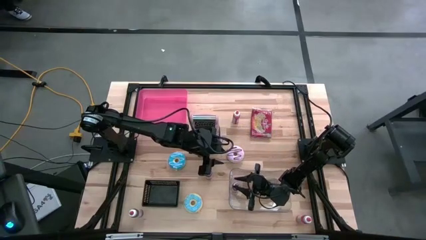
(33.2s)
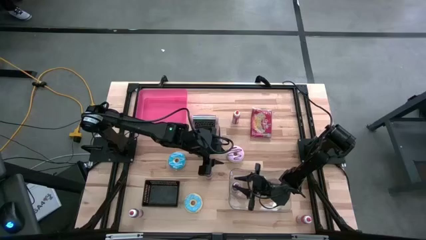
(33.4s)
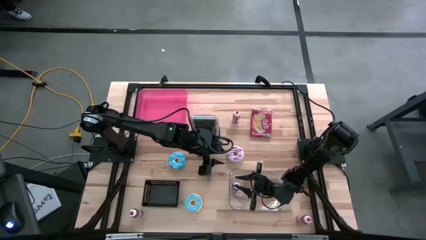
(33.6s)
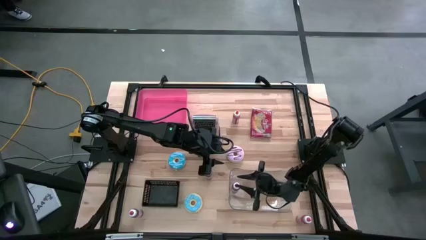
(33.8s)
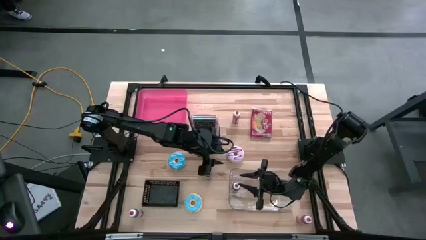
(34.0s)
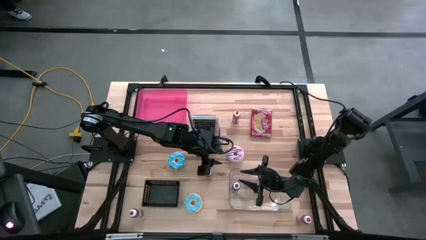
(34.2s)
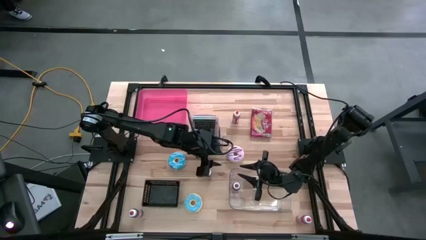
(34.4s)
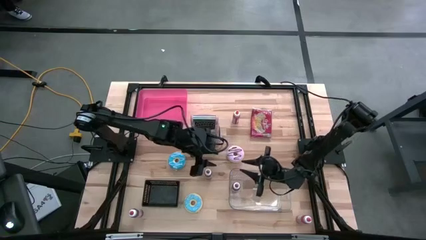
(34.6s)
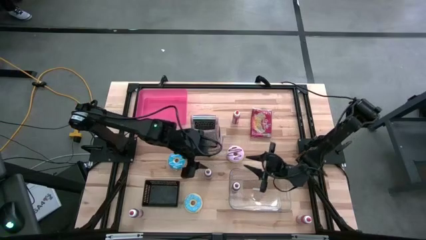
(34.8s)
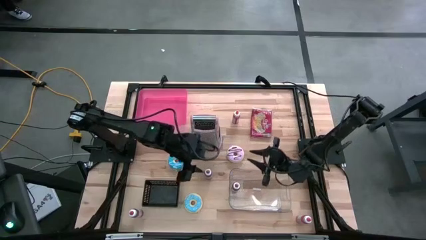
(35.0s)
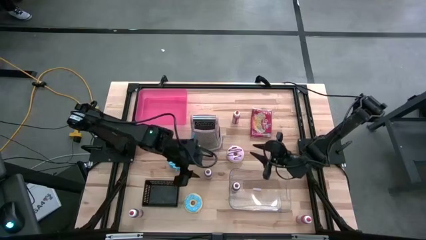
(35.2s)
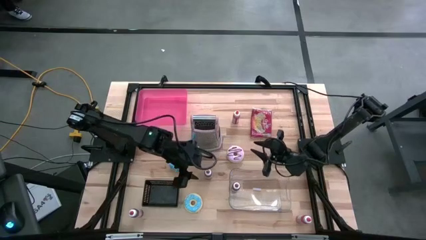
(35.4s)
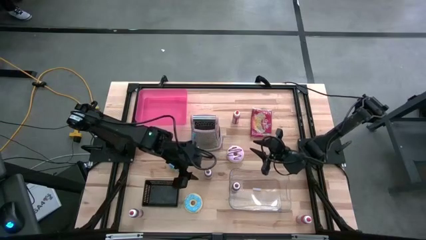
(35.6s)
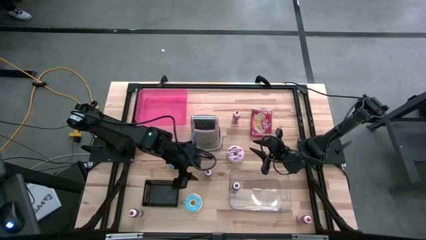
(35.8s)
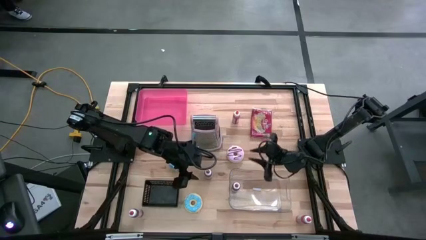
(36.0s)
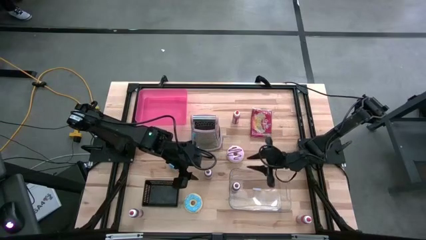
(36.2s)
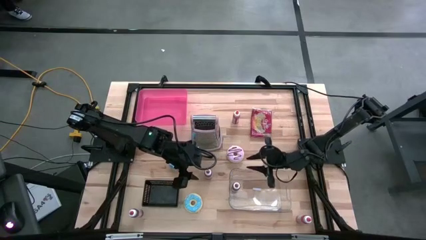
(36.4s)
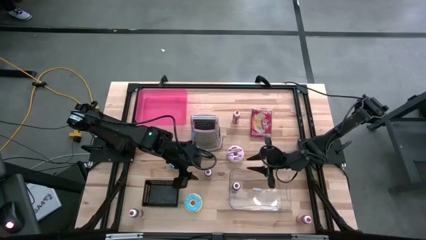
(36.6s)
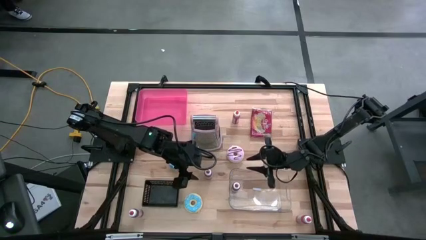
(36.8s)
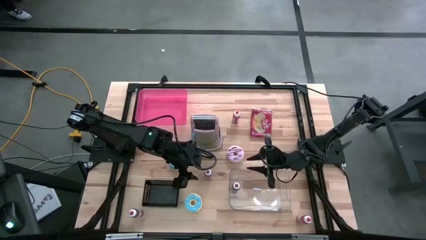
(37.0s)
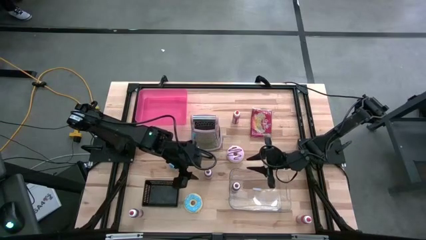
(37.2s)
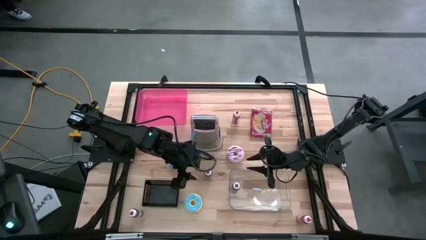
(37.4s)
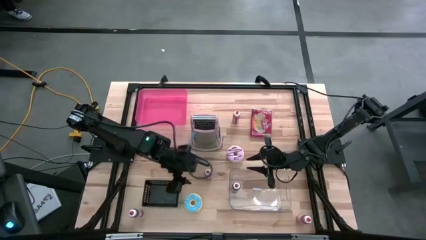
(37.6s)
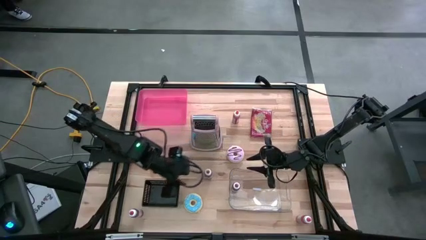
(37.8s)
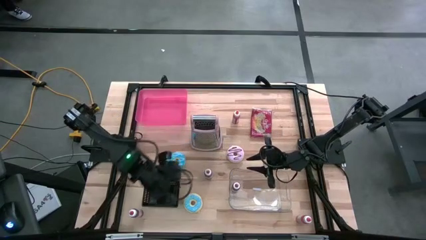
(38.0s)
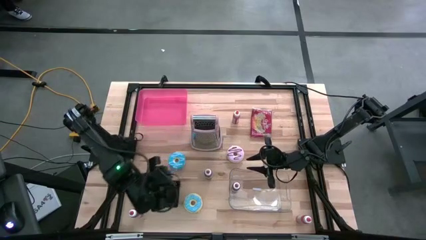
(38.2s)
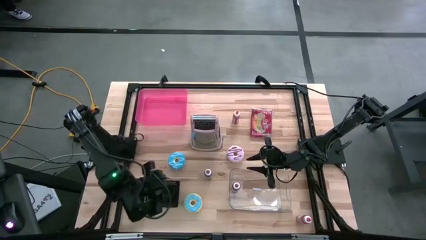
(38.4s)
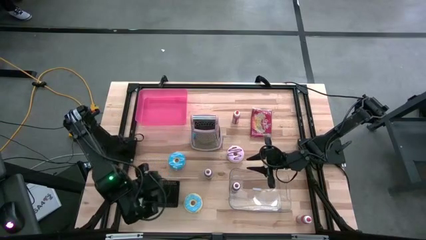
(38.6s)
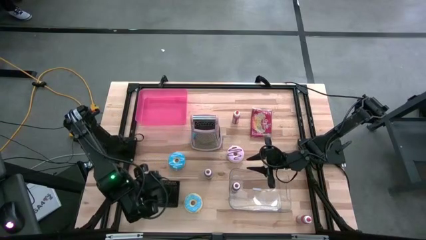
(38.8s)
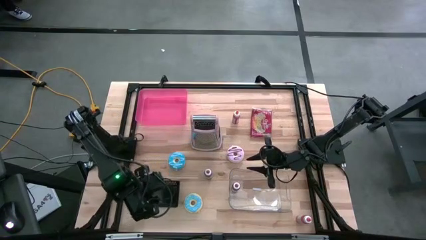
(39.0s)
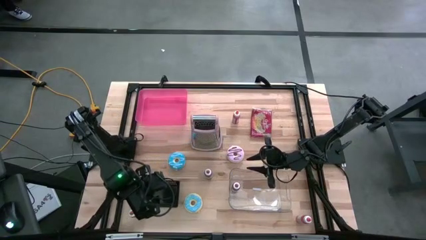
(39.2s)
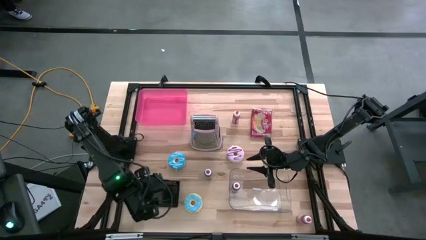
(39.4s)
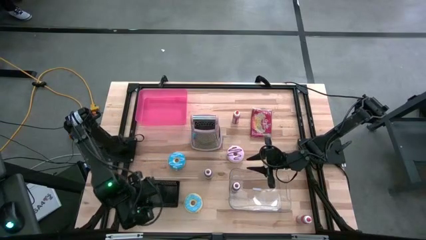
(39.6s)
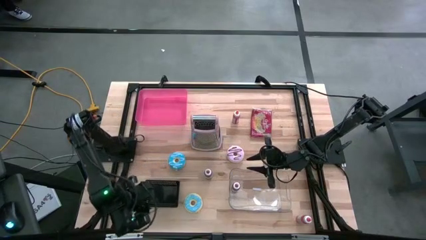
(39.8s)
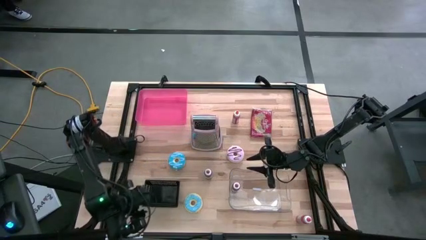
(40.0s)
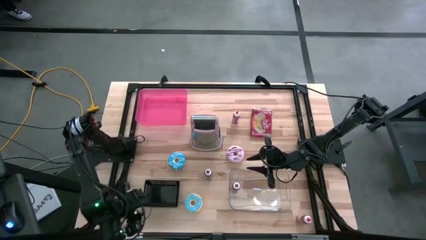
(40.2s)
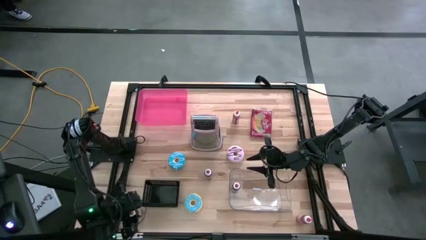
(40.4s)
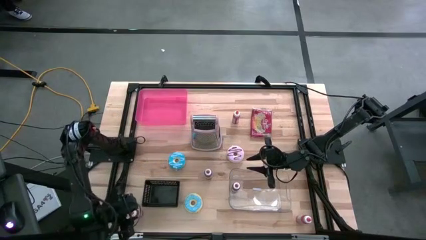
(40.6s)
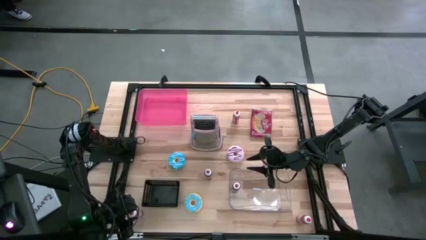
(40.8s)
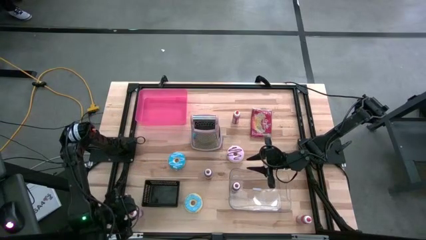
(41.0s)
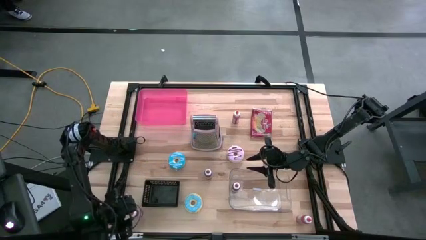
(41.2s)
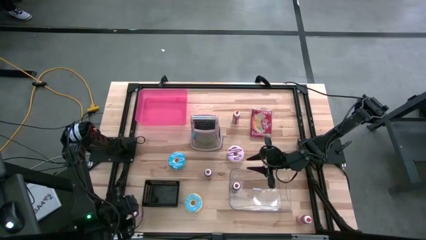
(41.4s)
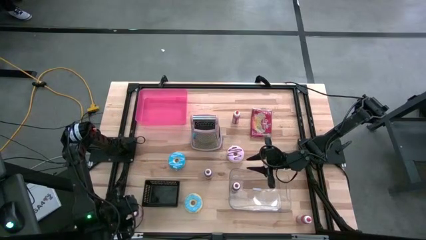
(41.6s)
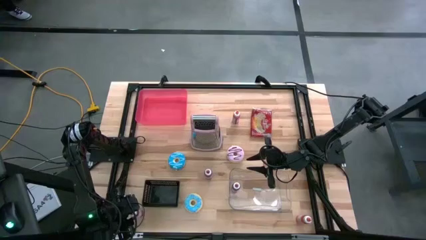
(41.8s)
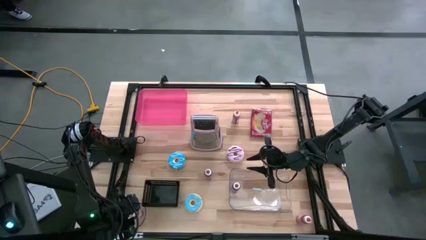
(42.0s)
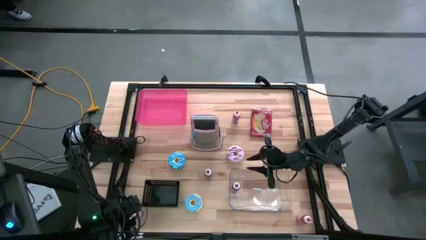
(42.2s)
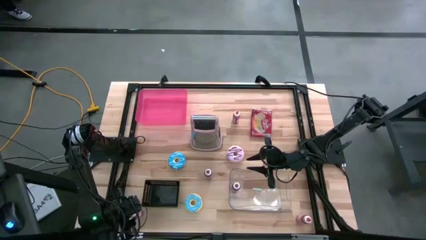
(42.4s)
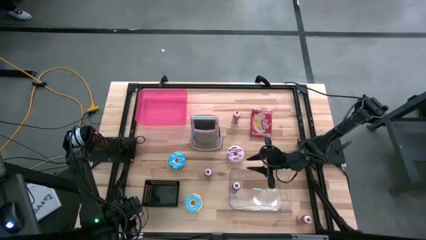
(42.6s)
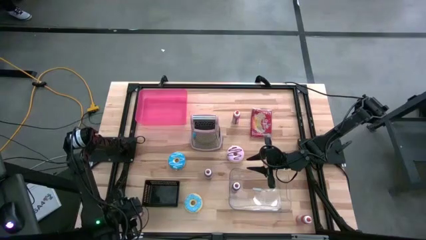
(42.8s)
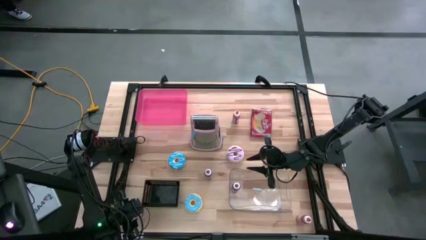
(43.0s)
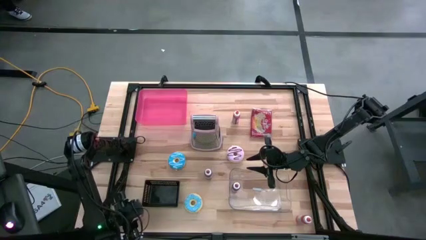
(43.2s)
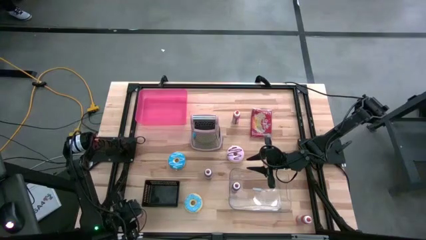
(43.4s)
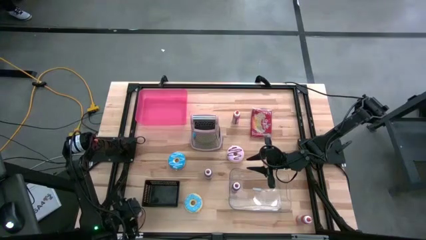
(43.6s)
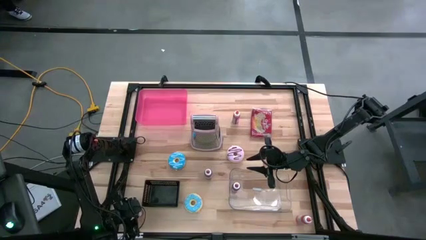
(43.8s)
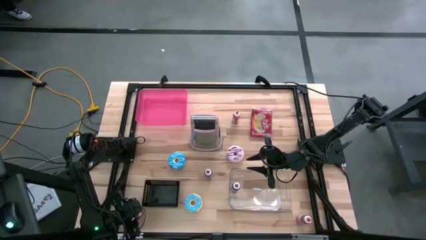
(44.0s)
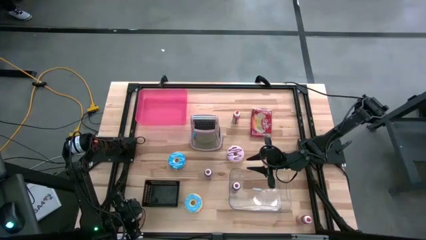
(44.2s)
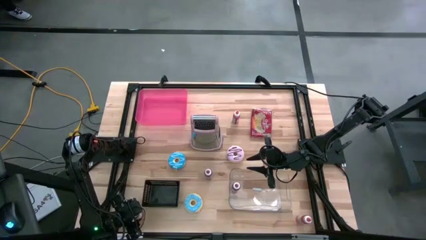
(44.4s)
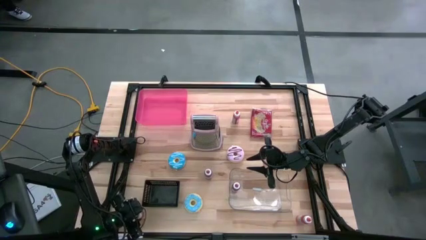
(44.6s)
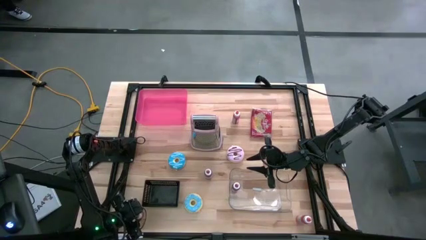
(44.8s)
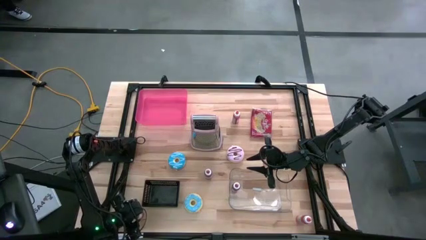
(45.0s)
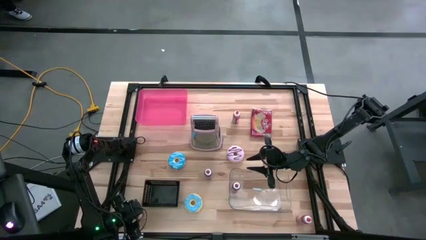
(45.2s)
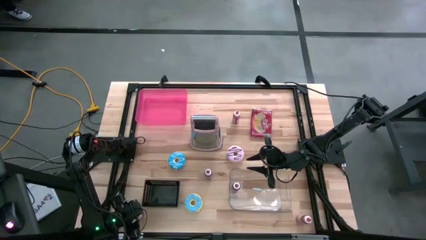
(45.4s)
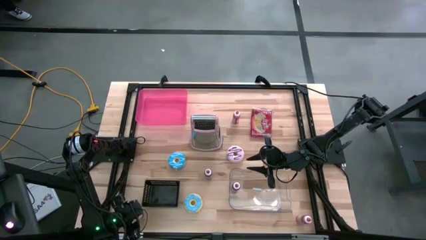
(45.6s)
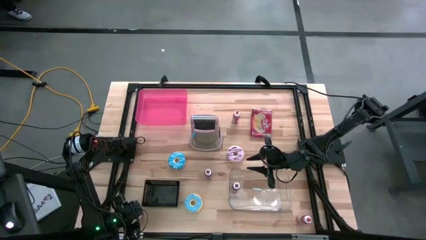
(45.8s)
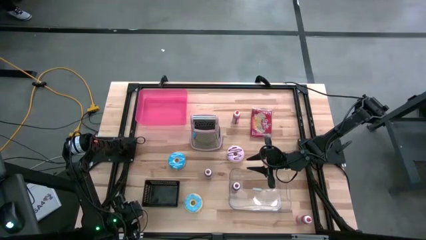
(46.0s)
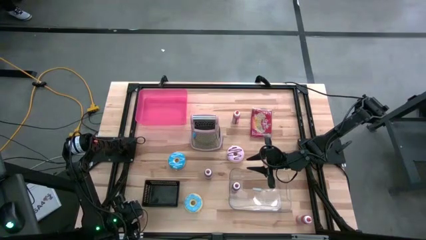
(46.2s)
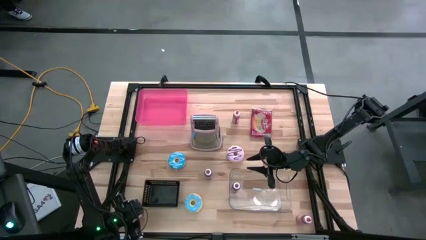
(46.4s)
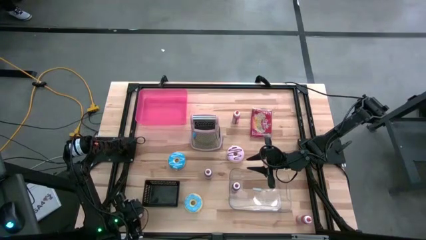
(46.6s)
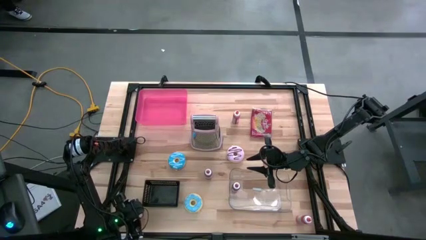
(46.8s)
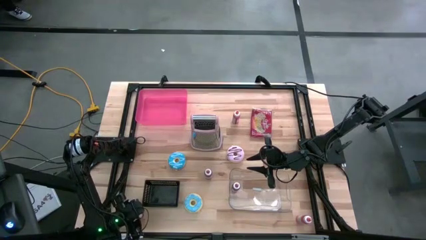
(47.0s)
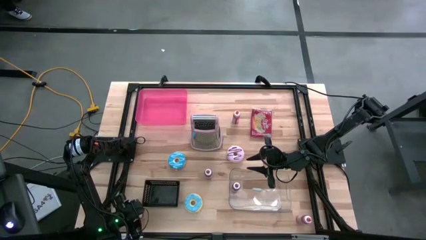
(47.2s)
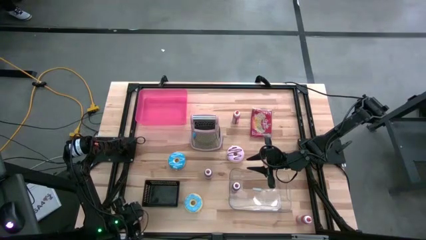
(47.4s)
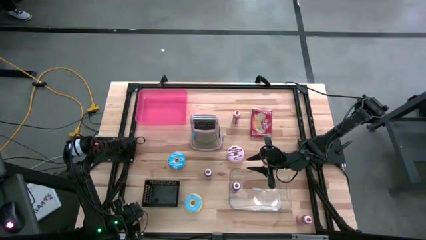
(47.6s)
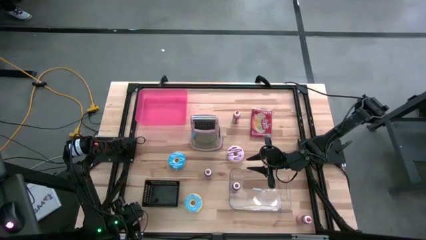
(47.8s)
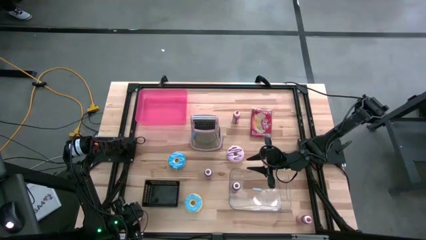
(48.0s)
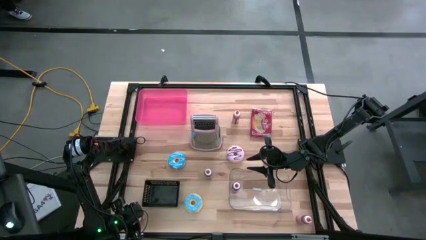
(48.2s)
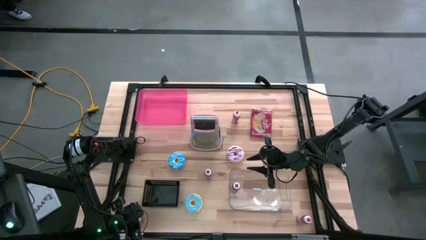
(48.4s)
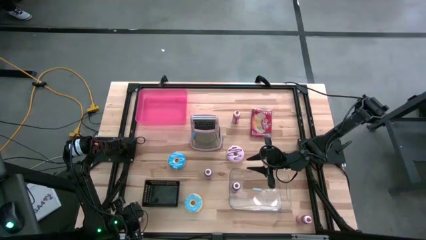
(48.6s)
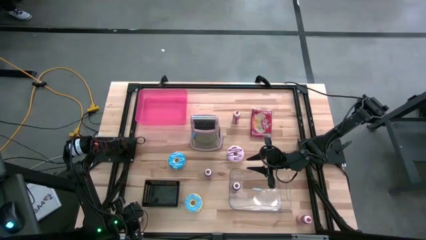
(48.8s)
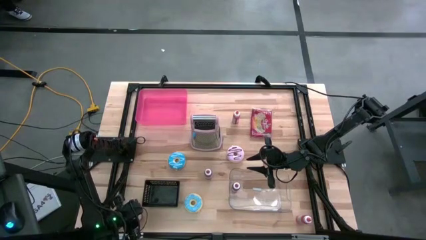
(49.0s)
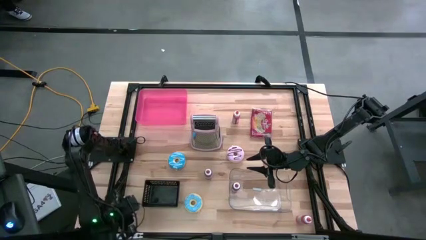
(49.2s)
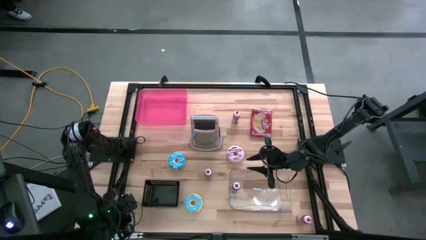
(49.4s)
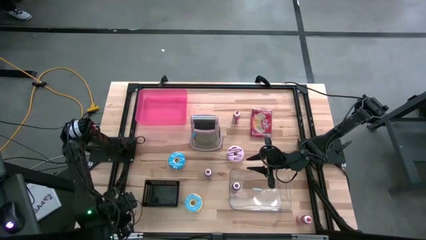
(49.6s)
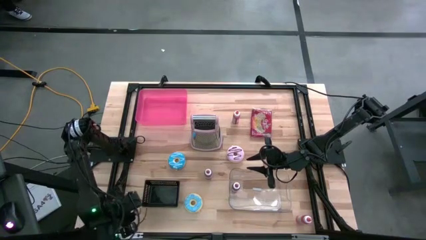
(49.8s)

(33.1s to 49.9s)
Task: Pick & Place Food Item
Put the left red food coloring bottle into the transparent bin
